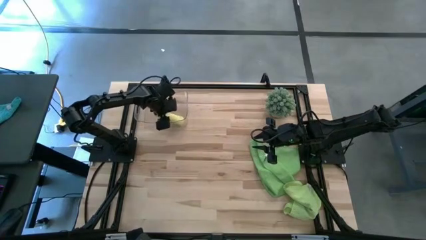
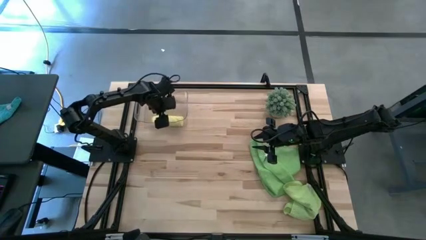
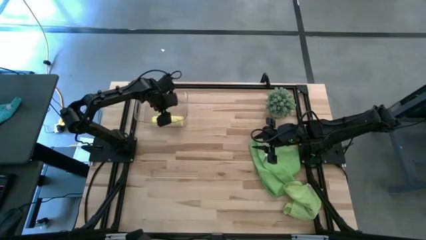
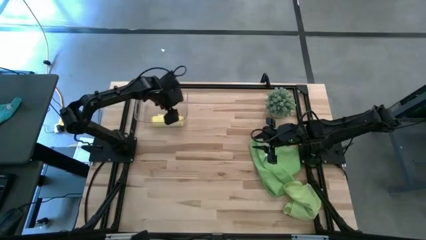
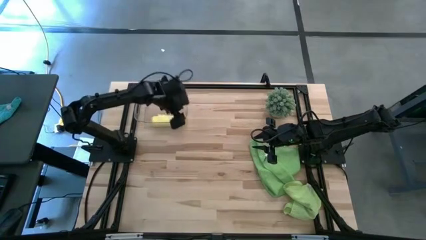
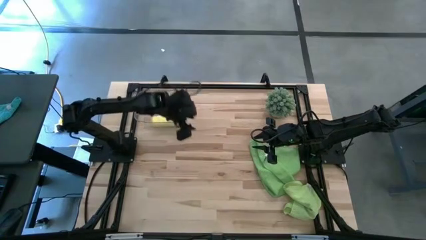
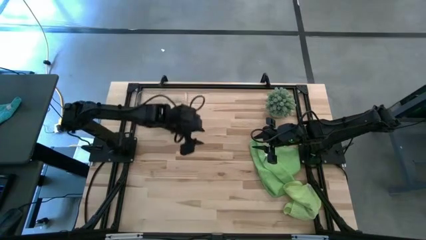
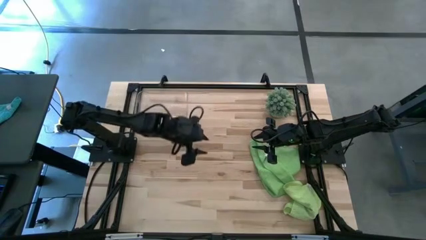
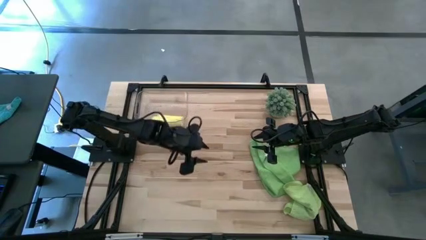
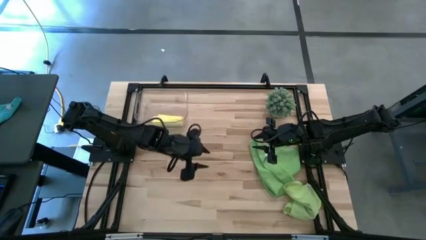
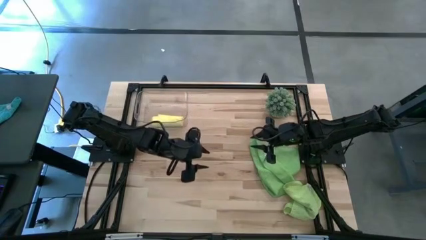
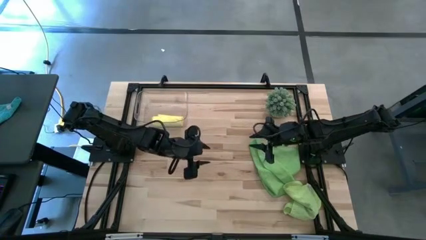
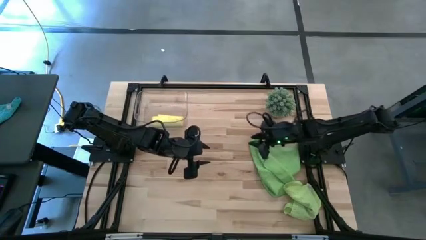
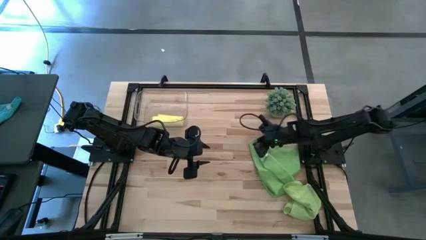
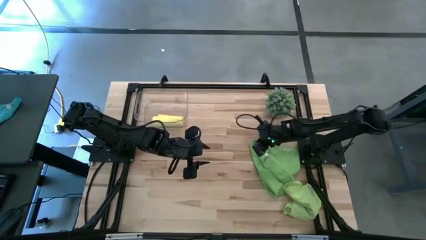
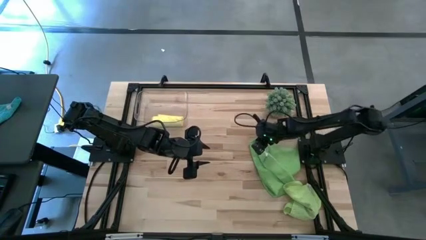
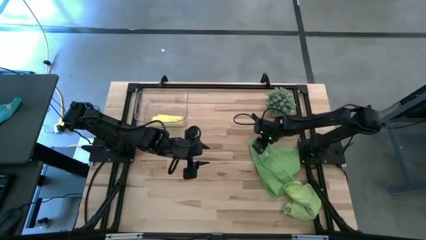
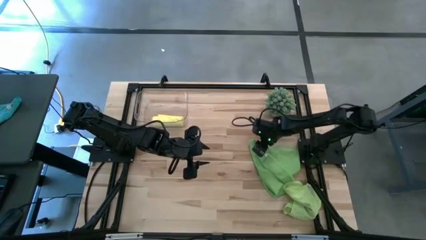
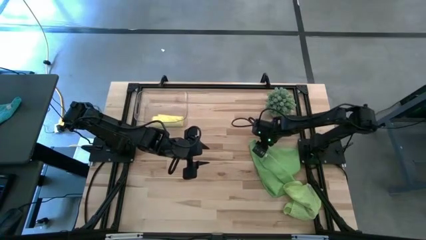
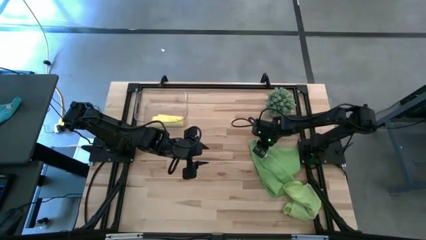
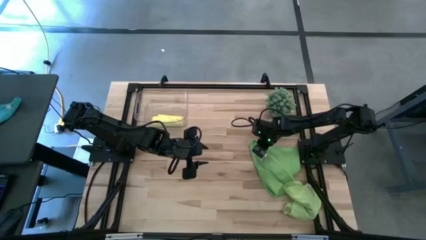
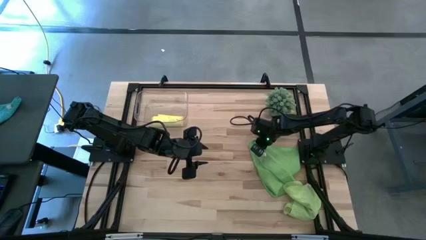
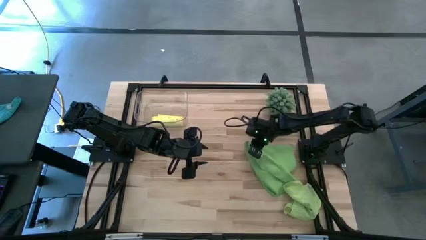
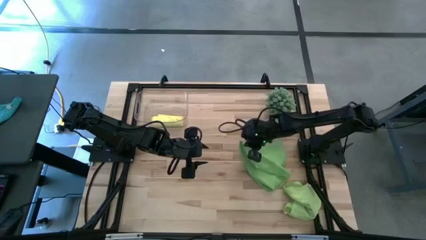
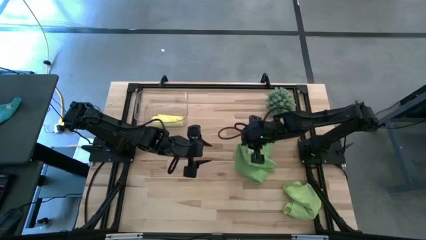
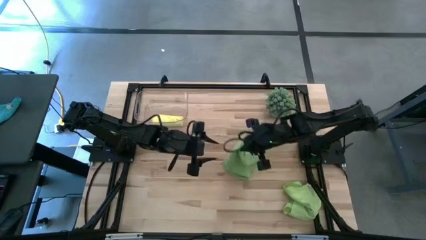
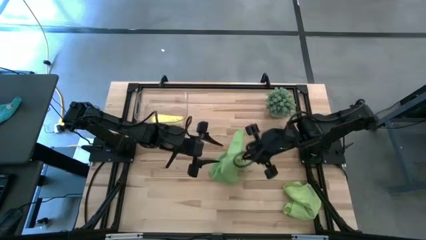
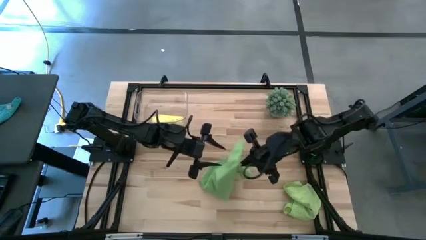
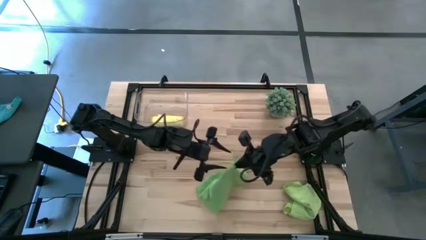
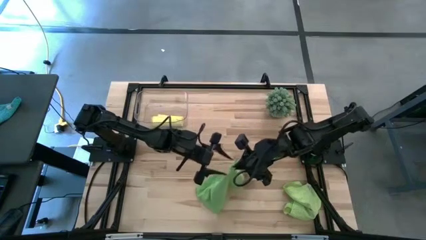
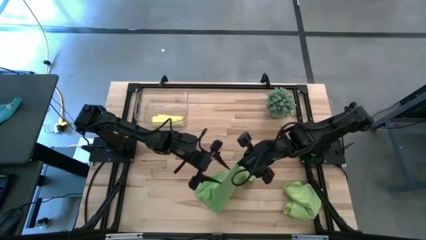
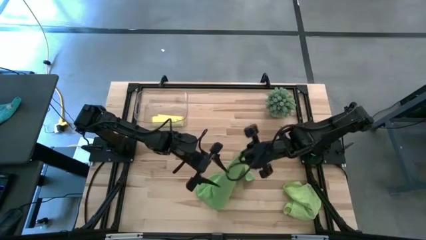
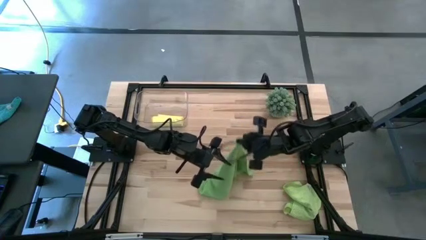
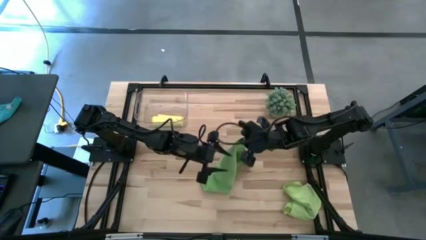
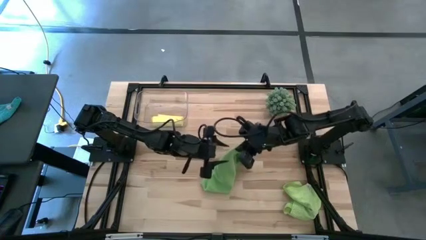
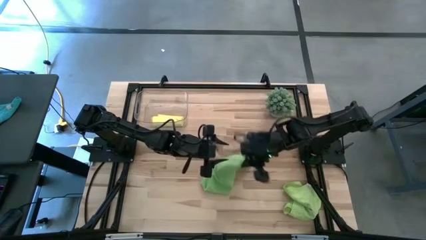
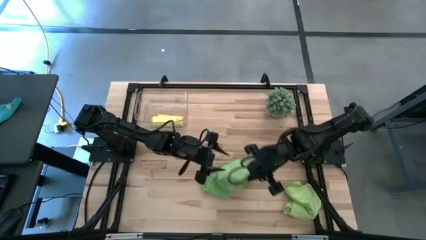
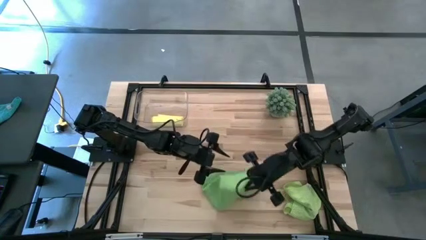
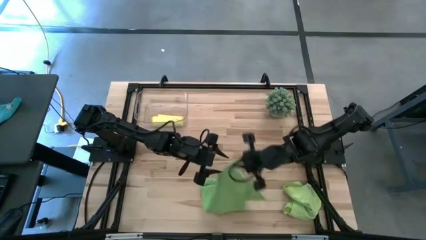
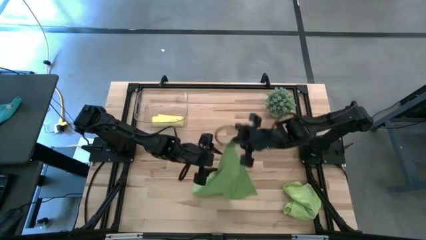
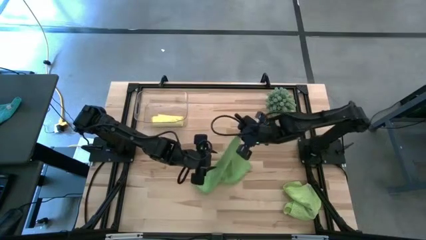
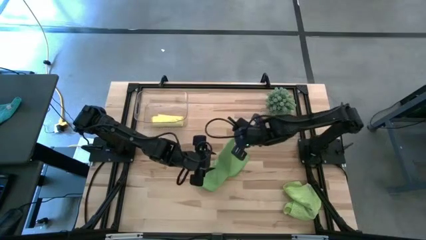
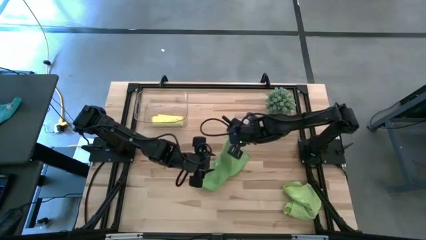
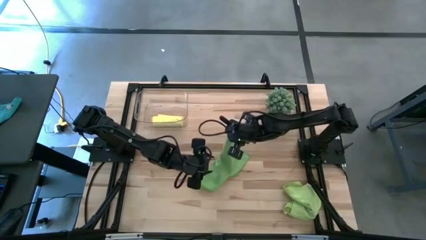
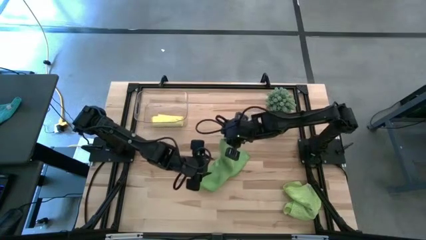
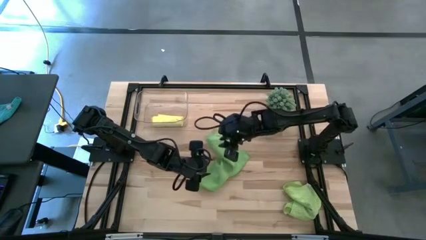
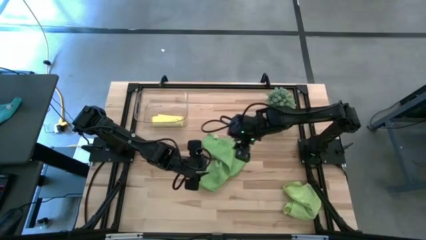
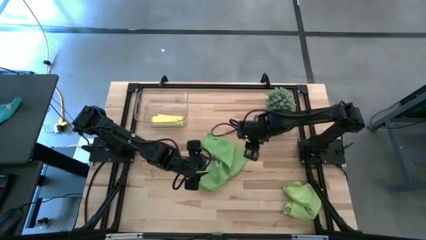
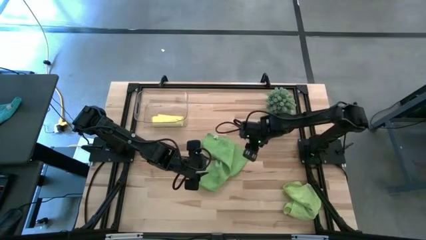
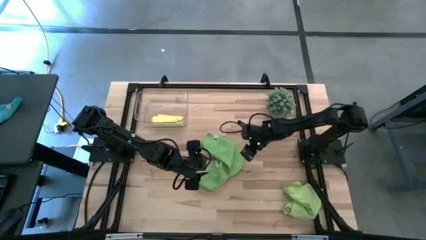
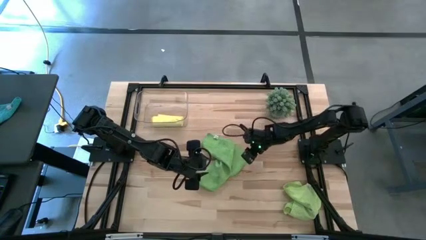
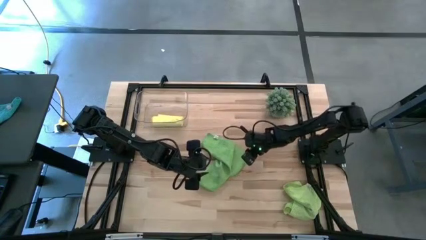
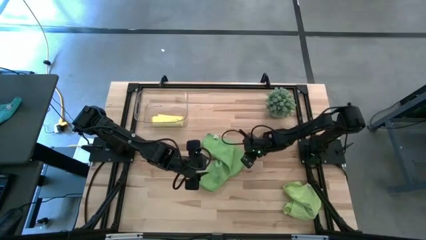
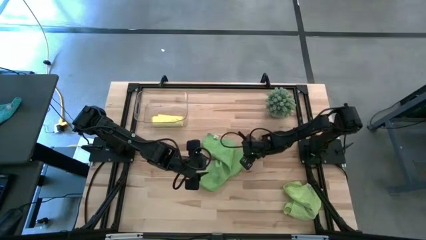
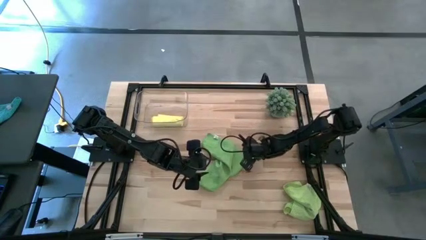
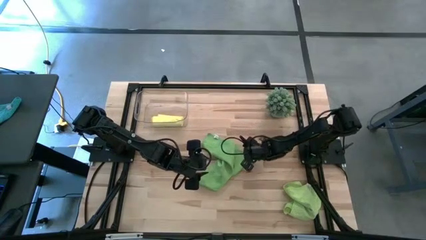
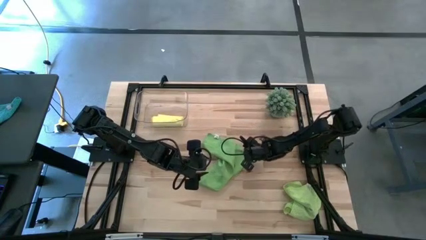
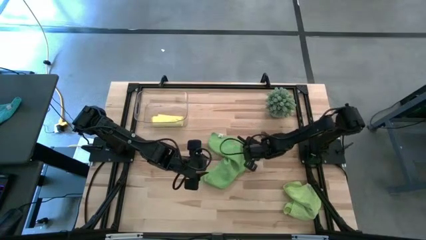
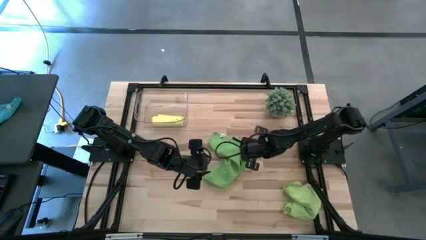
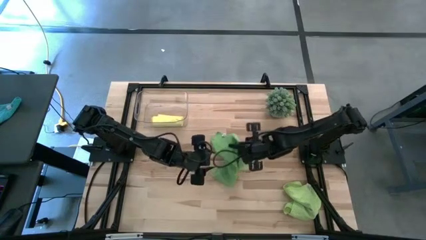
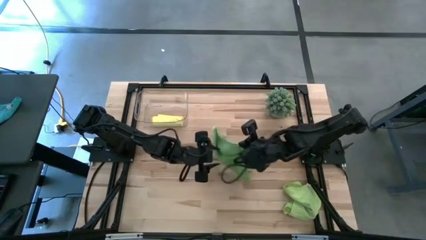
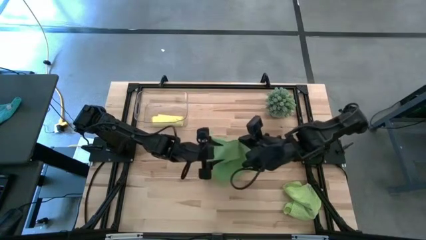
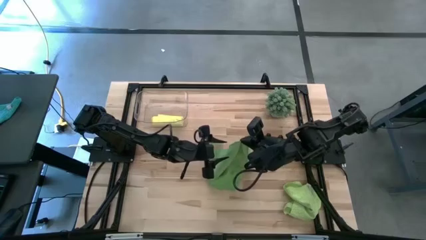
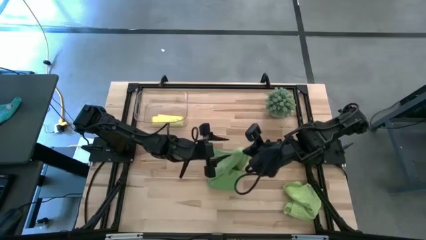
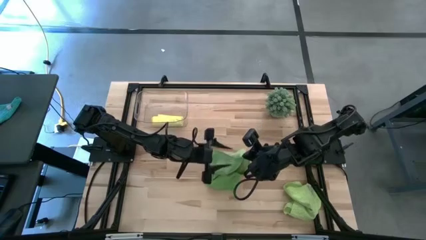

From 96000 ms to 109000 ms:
Task: Roll microfiber towels into tight, uniform cylinder then place into a basket
Fold the green microfiber cloth

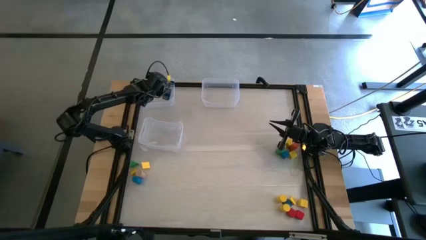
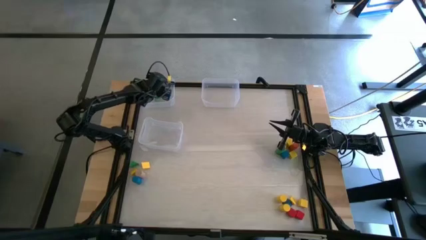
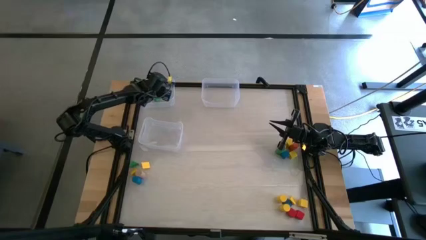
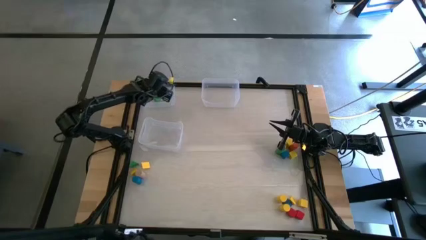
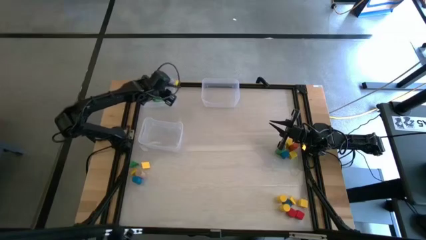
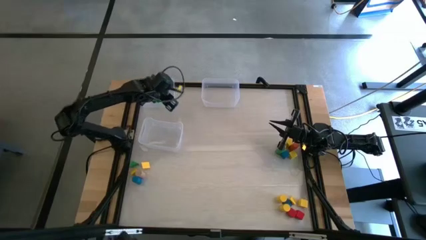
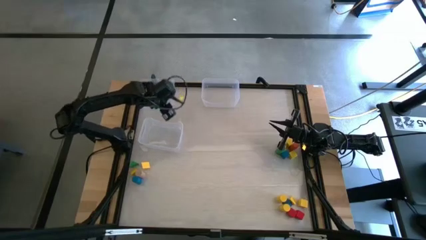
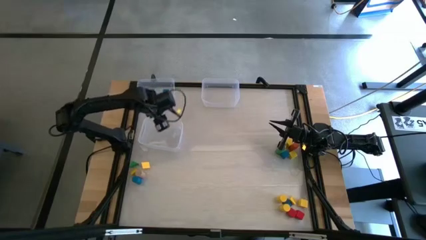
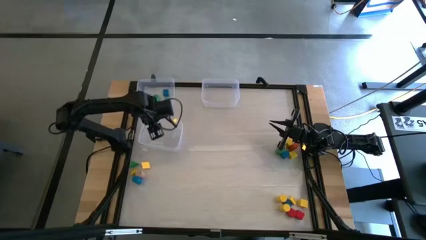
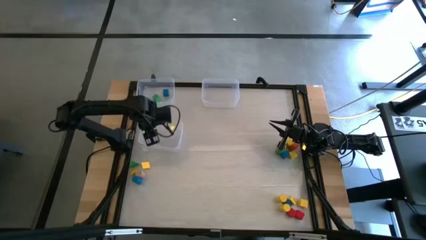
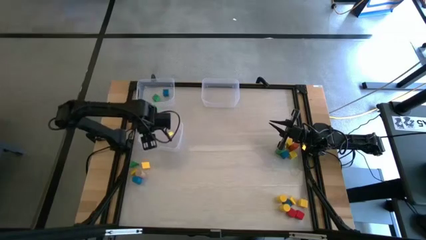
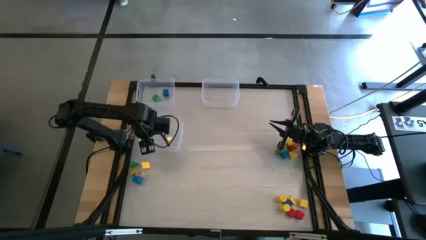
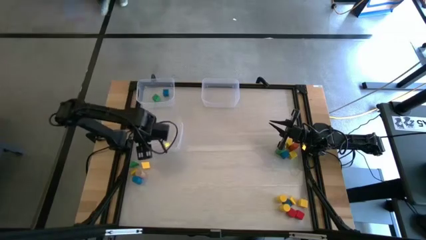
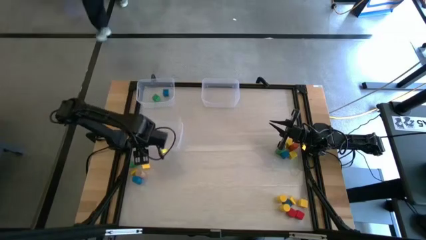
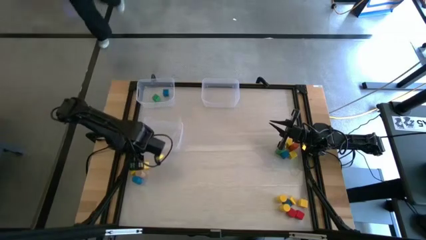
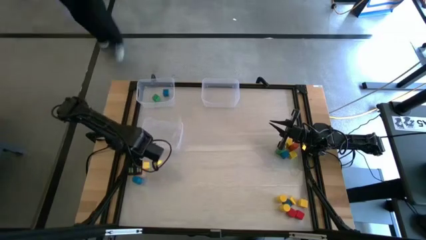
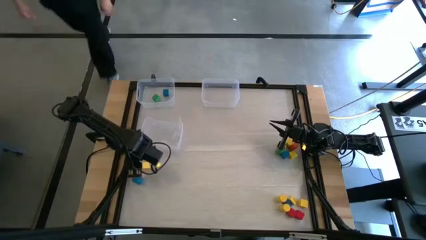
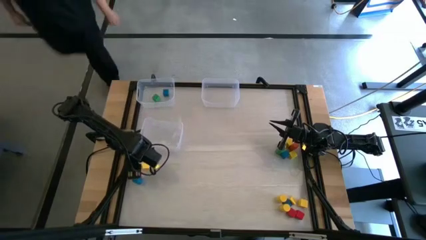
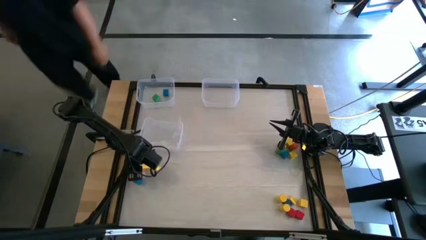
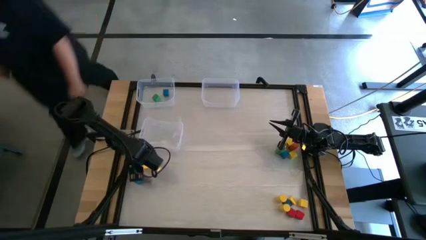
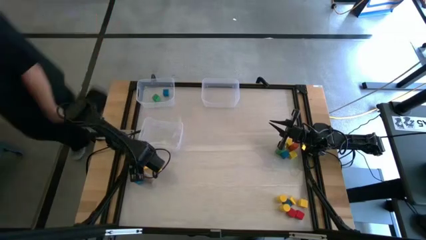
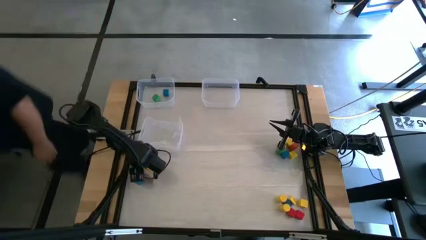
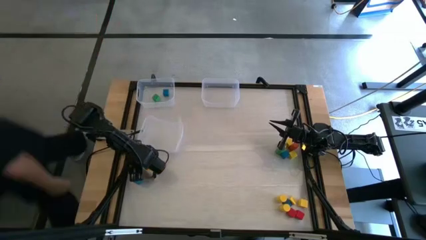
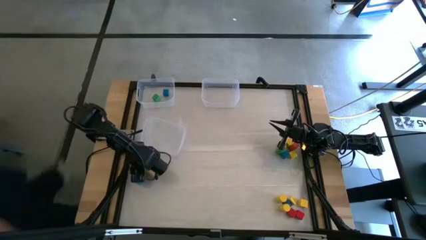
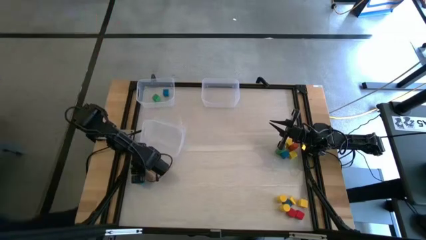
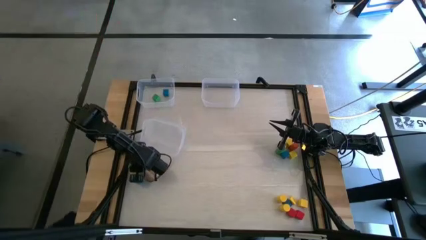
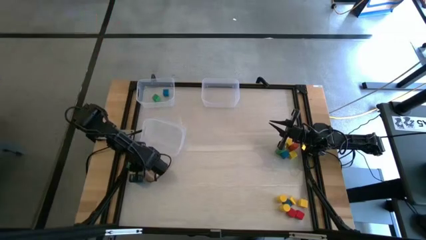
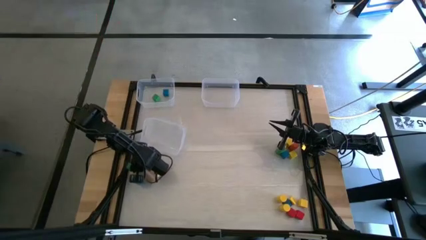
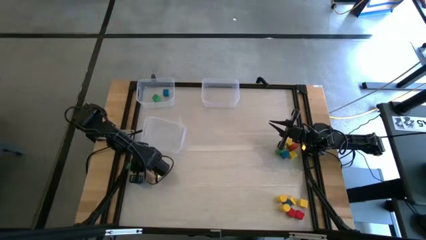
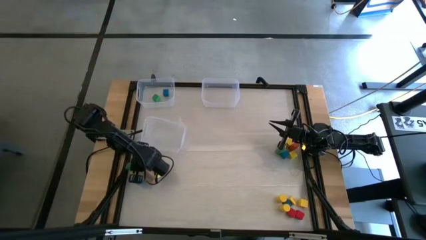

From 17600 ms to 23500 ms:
Task: Sort blocks by size
Put the green triangle game block into the middle left transparent bin
